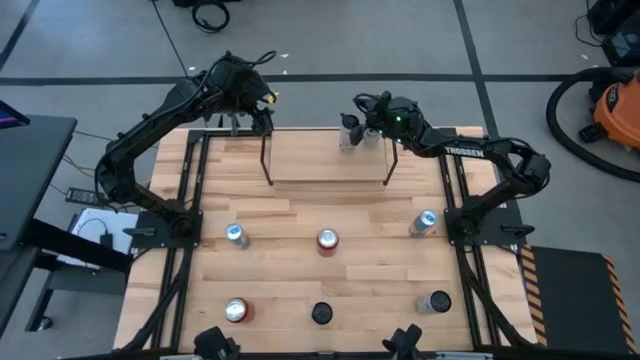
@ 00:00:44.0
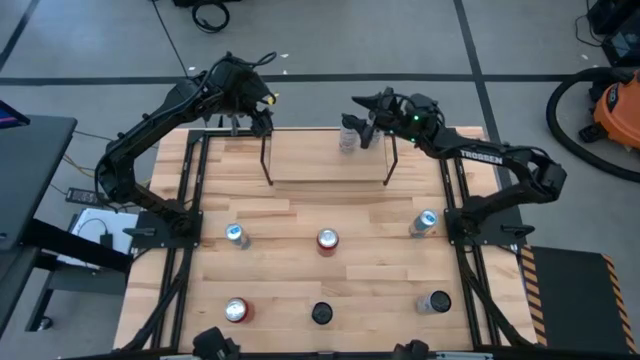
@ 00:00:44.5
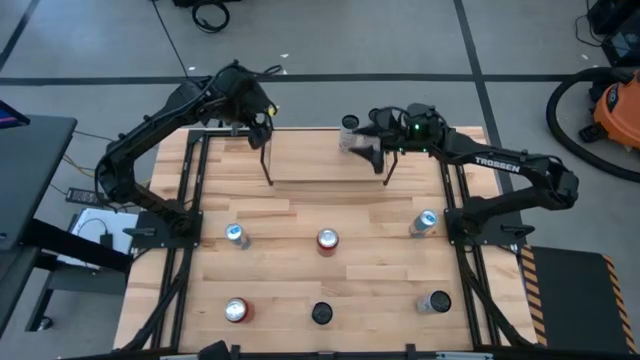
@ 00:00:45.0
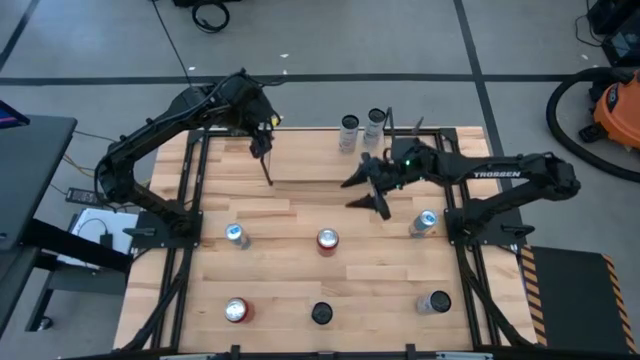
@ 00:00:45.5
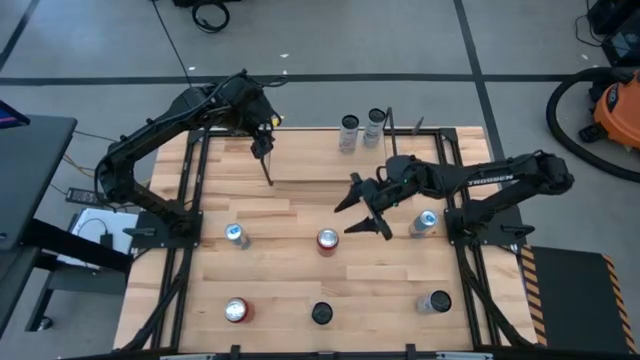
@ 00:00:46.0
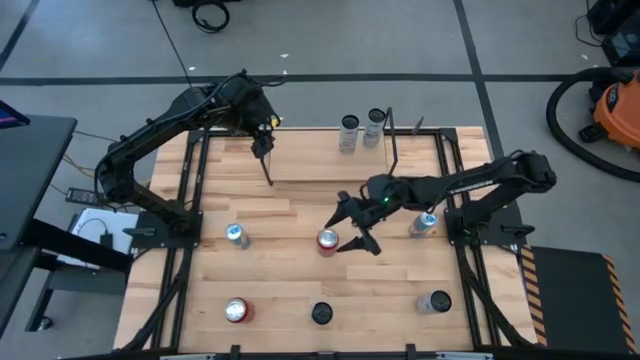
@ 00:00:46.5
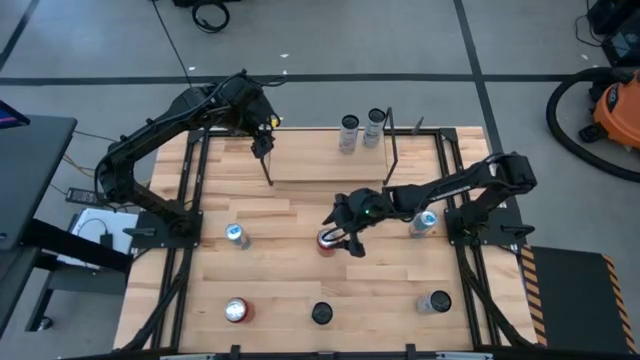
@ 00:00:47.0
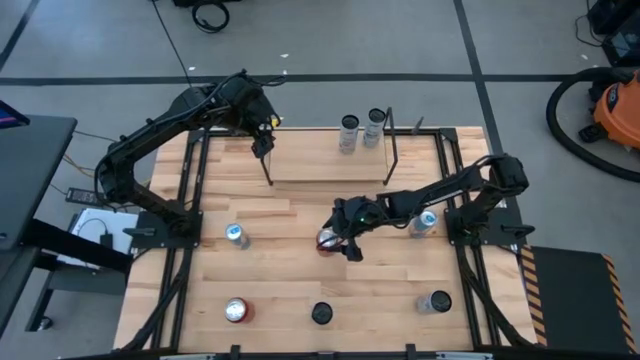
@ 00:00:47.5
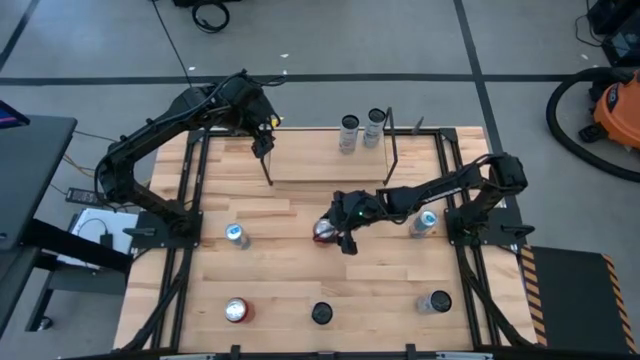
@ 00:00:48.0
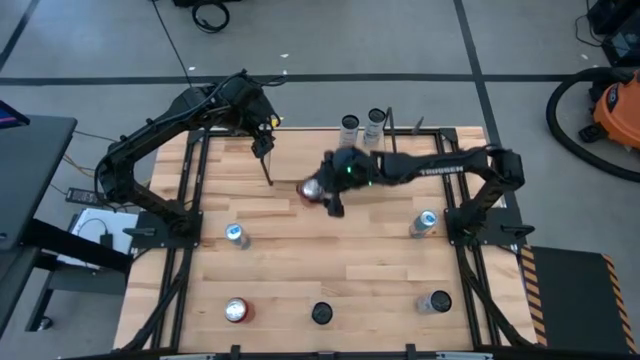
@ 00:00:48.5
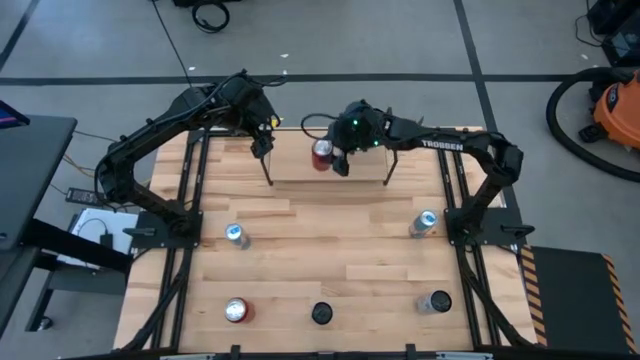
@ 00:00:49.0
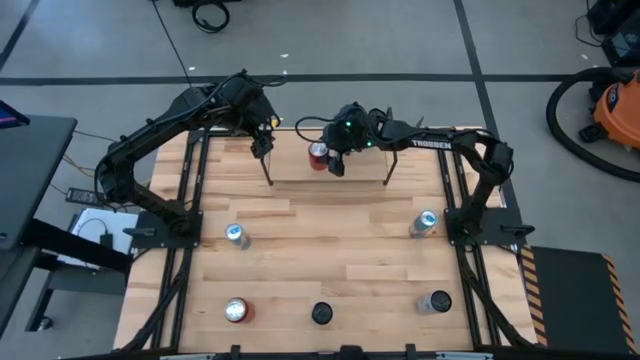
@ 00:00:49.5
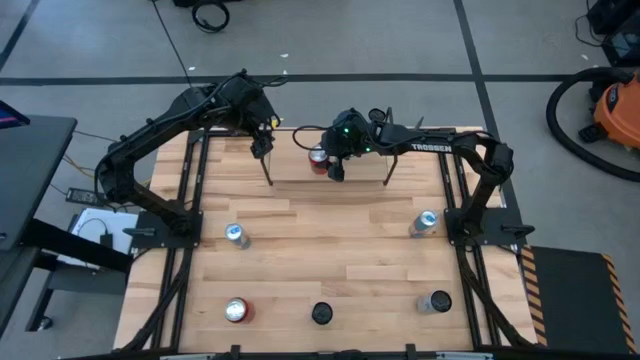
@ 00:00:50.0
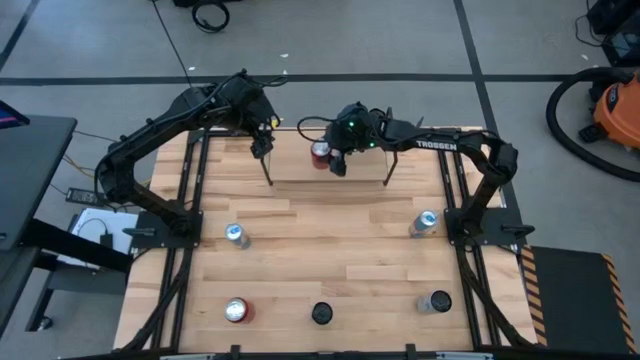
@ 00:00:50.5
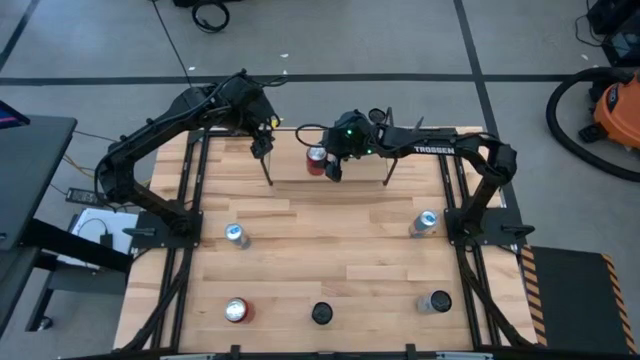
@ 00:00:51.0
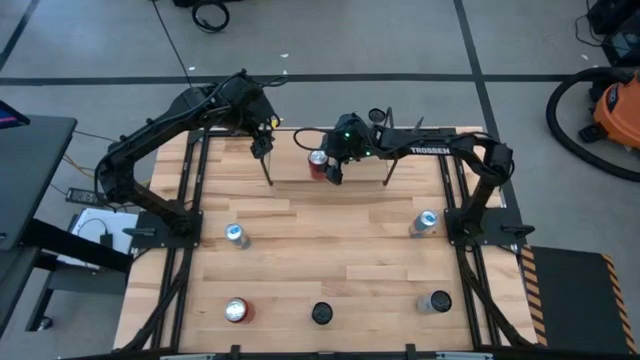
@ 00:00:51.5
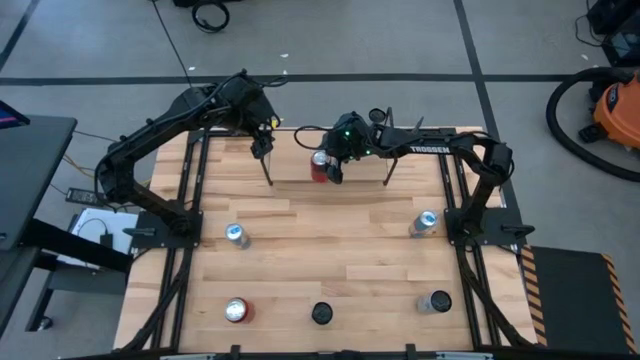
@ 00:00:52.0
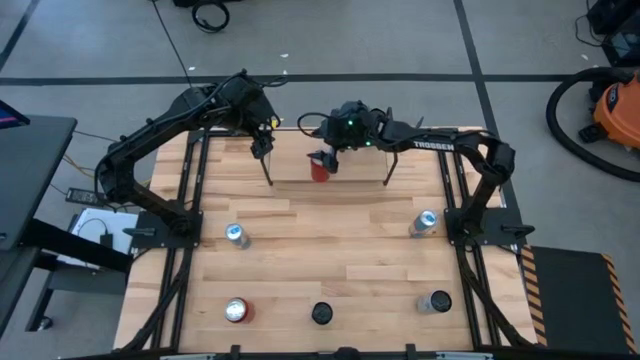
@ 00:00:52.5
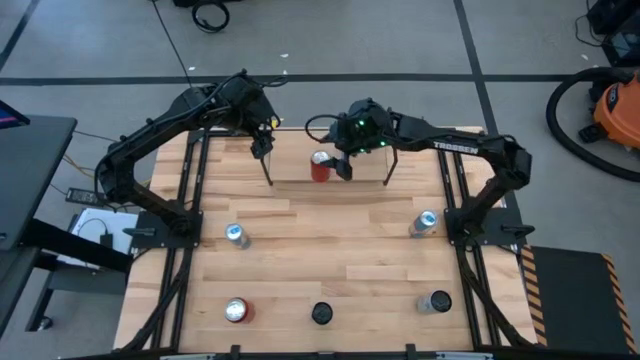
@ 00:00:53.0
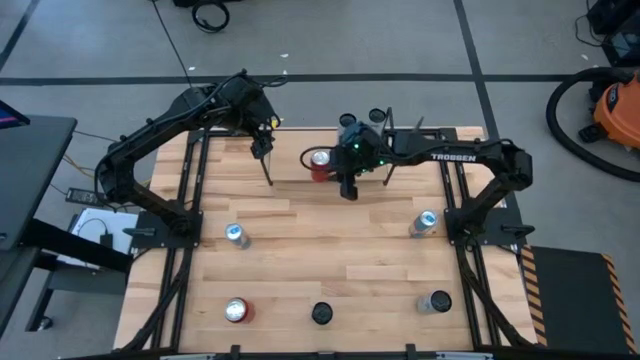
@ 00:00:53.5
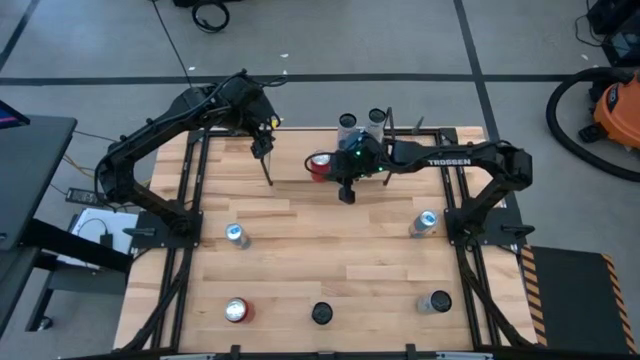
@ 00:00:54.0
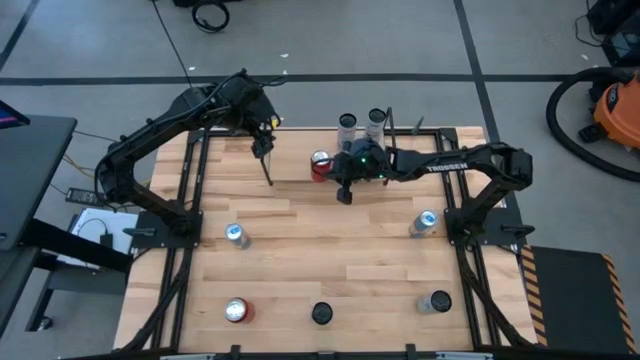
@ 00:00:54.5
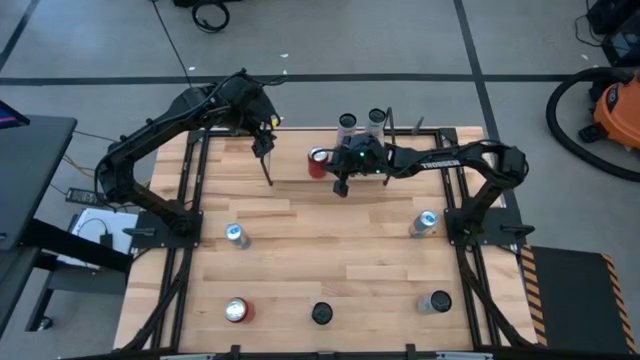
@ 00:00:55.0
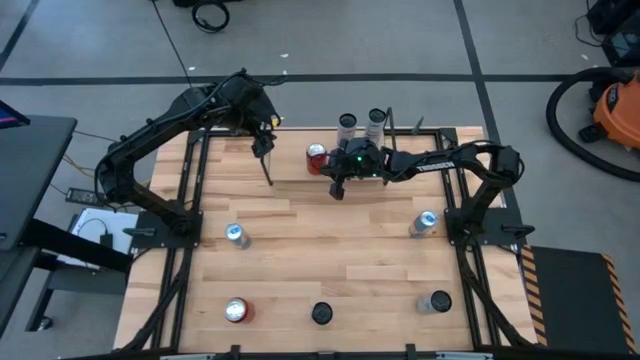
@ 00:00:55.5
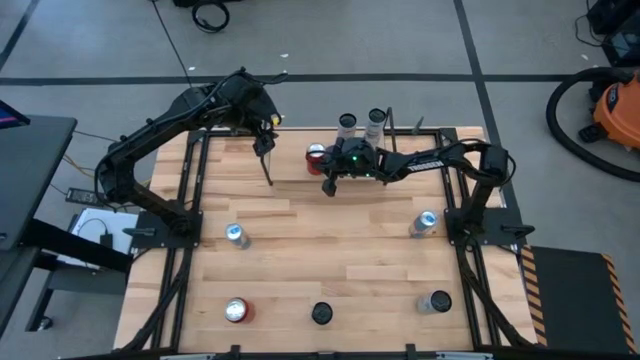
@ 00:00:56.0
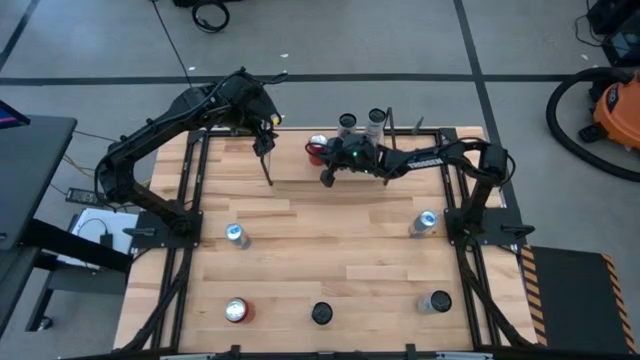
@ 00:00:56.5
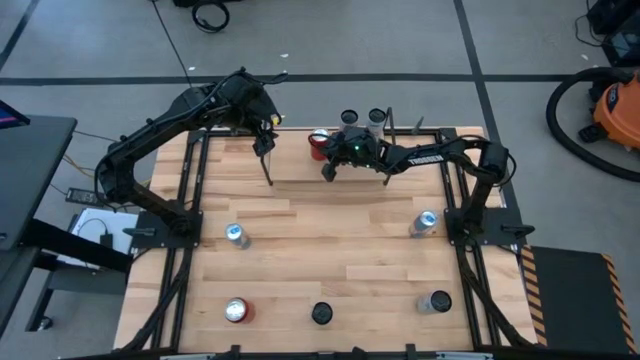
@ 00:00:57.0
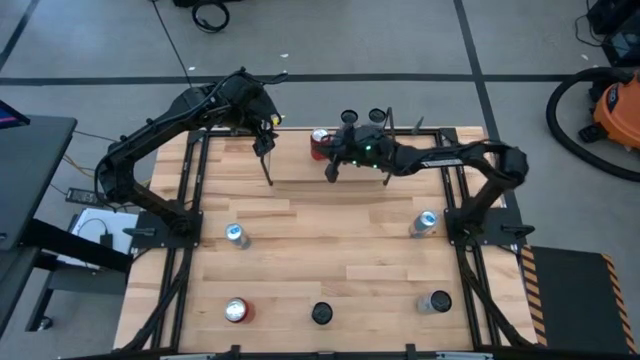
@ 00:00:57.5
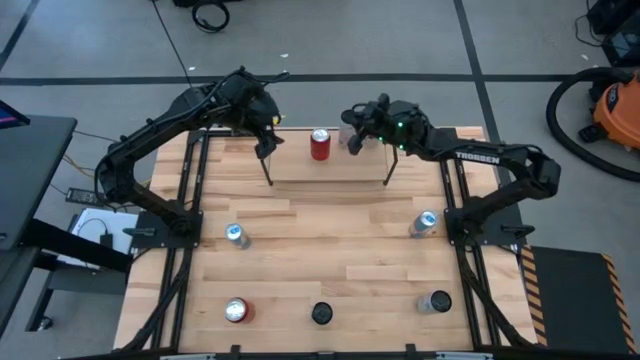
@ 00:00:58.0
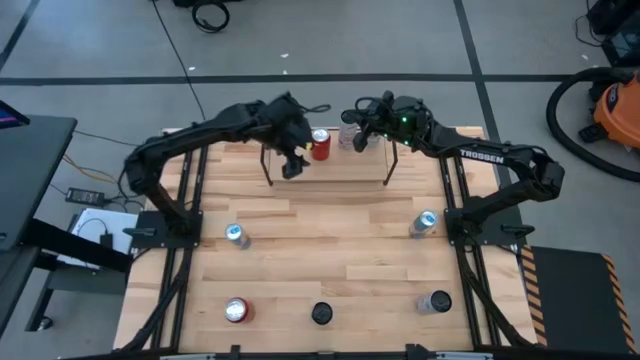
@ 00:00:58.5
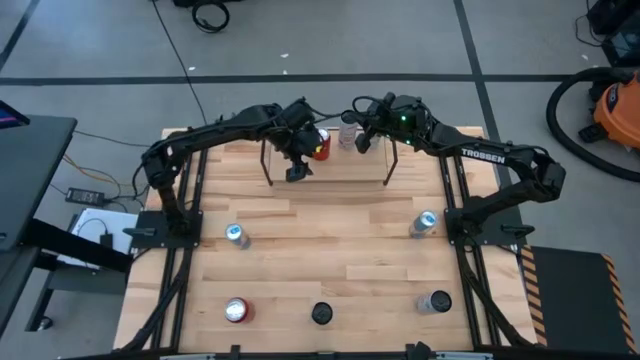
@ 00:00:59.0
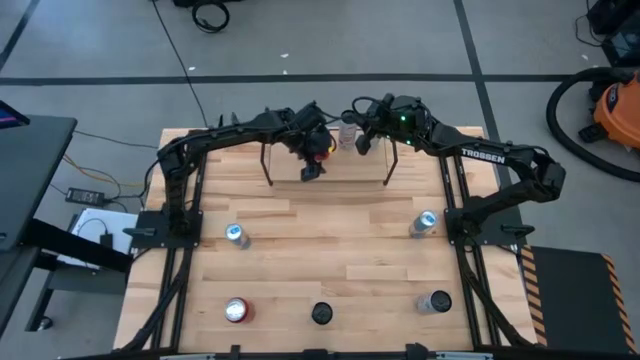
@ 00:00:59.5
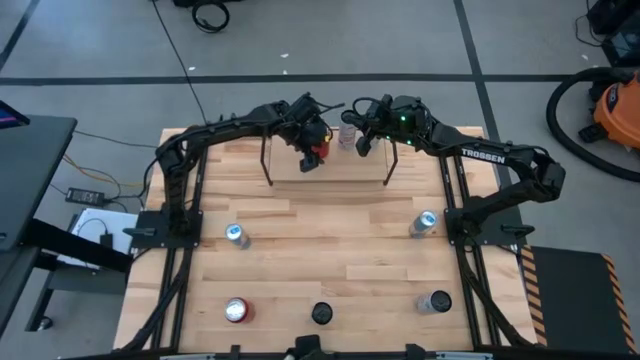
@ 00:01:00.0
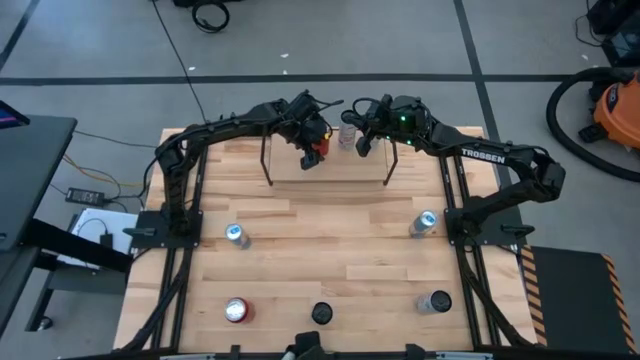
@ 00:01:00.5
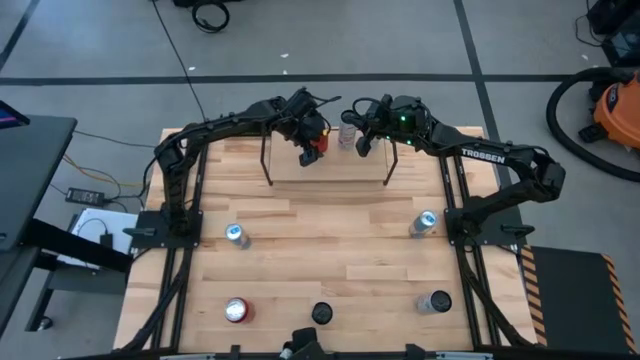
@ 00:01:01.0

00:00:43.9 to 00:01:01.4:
Task: Place canned beverage on shelf
Put the top red-black soda can on the shelf

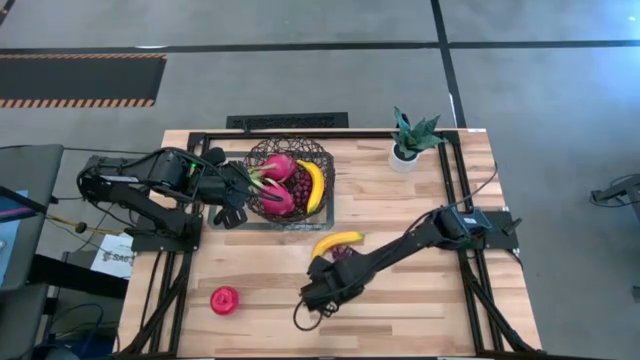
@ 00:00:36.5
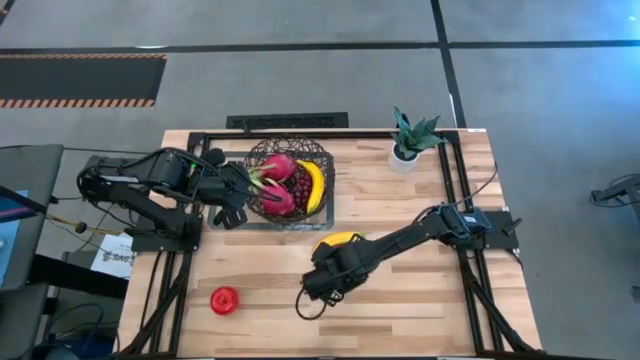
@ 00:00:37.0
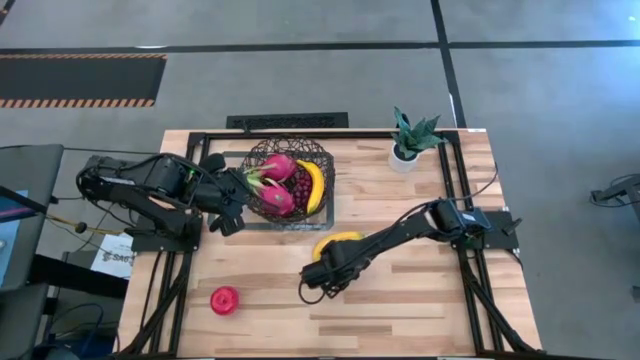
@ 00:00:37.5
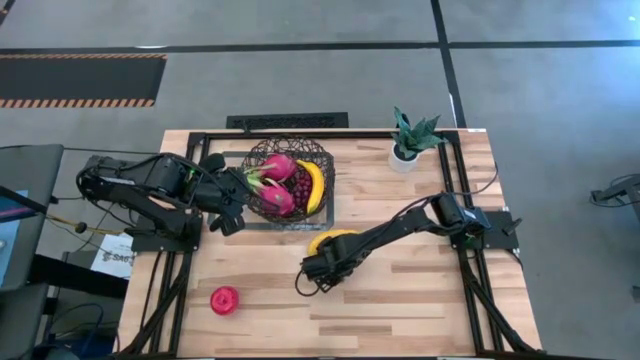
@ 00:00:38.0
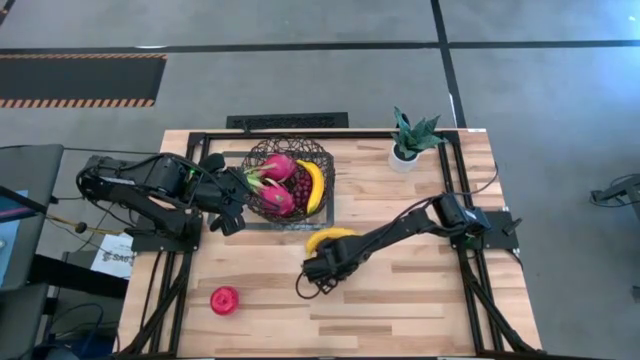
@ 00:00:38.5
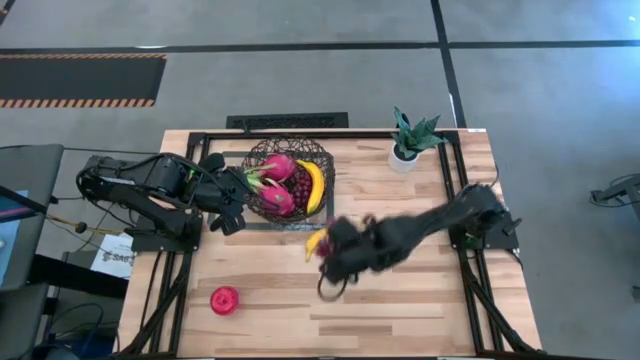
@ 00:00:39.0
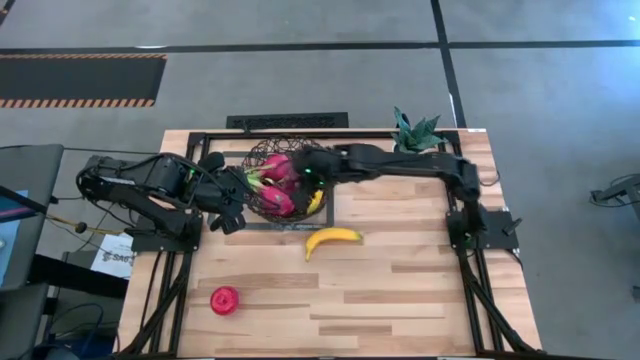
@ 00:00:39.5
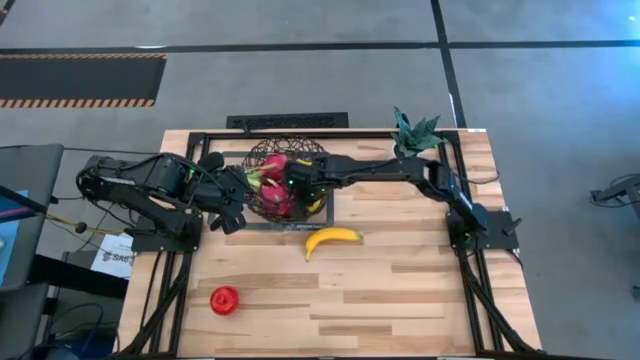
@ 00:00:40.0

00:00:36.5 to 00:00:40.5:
Task: Build produce basket
Put the purple grapes into the black wire basket
